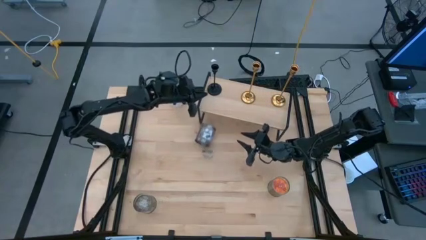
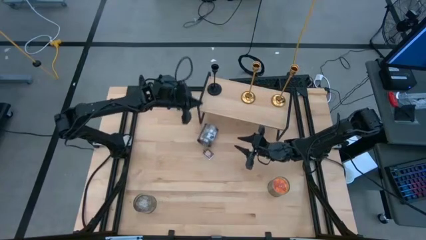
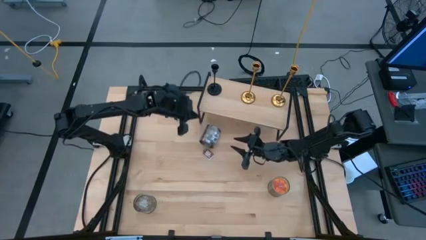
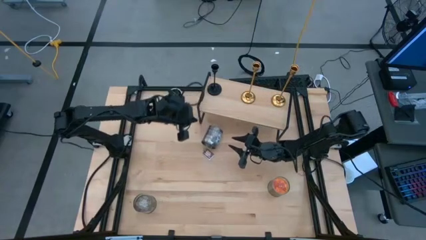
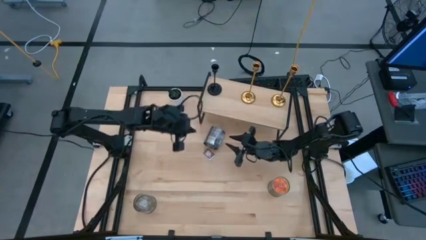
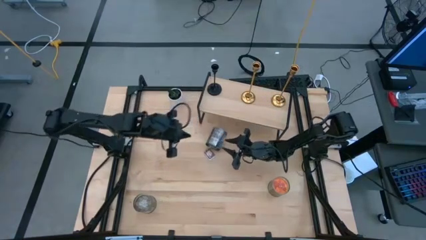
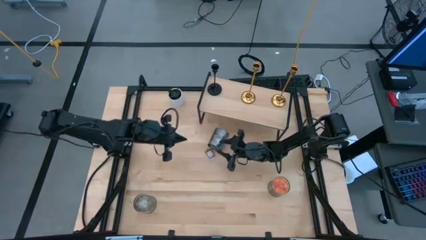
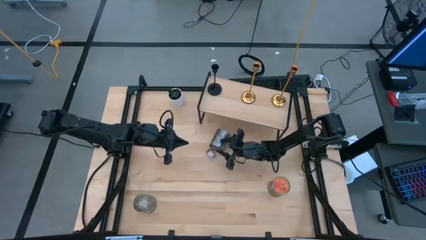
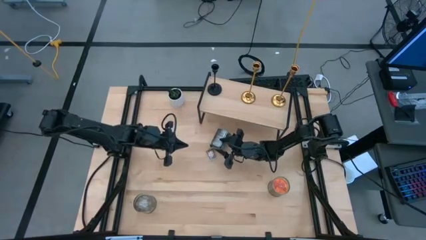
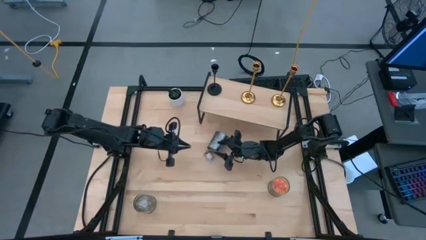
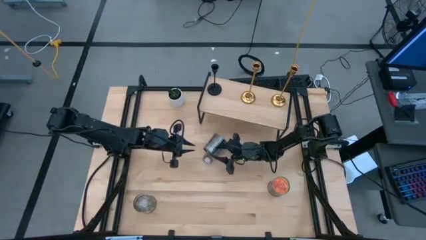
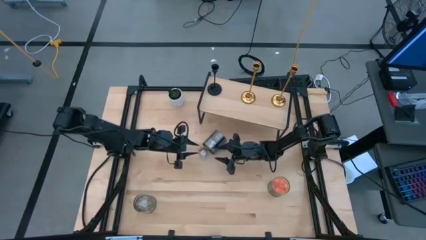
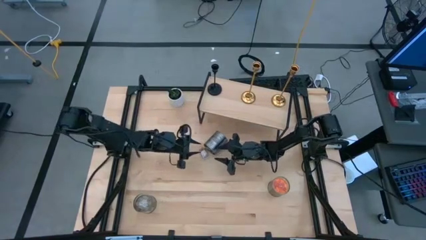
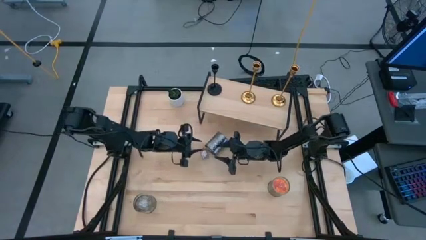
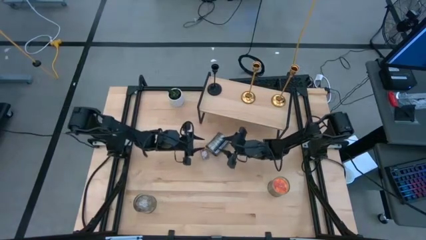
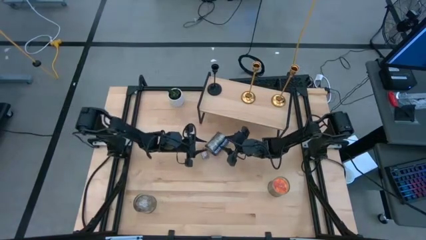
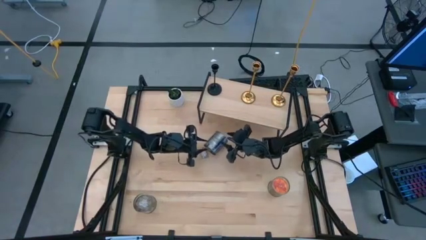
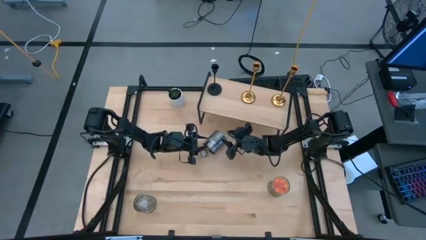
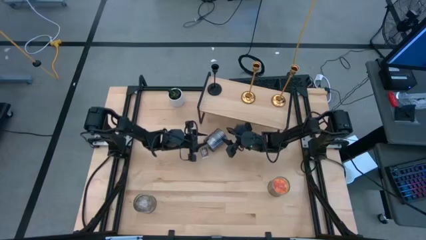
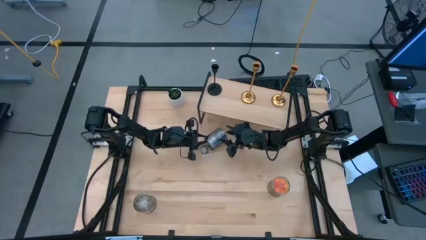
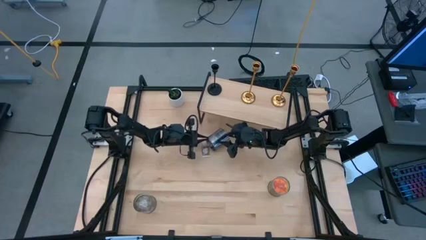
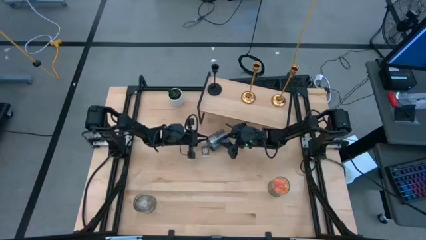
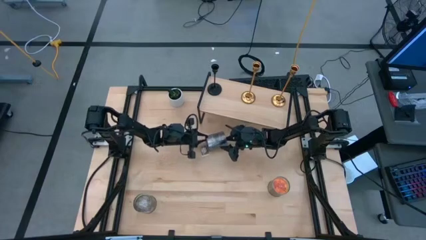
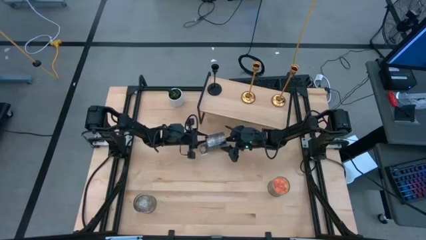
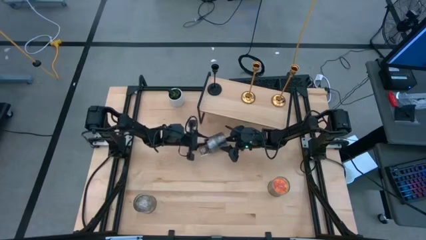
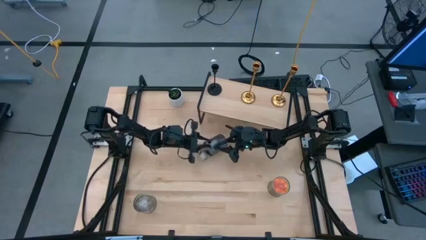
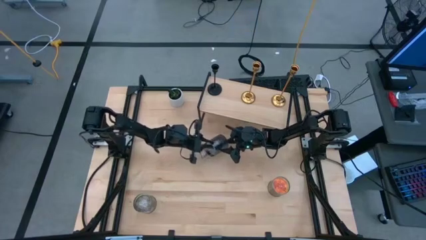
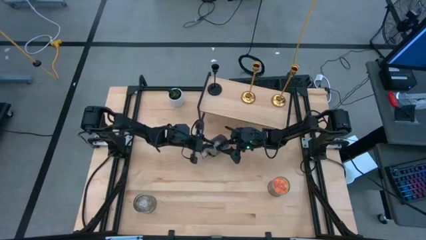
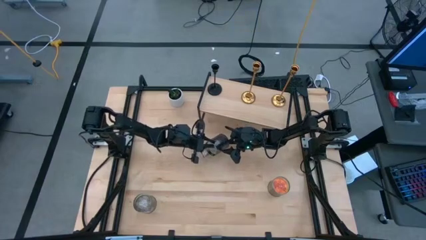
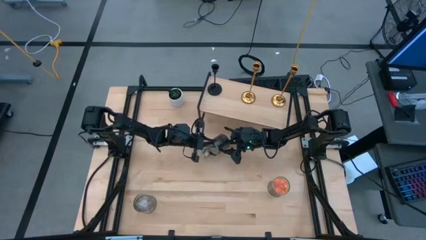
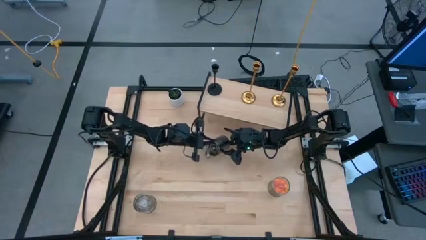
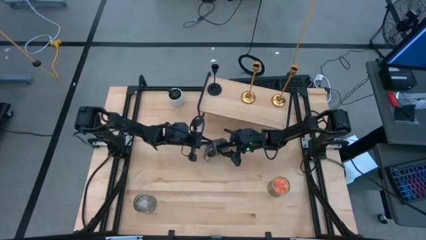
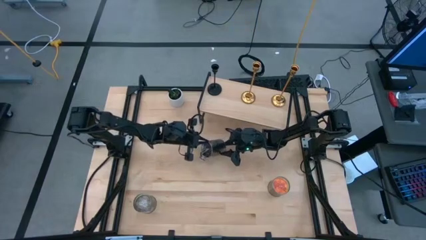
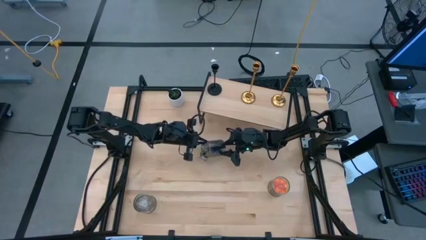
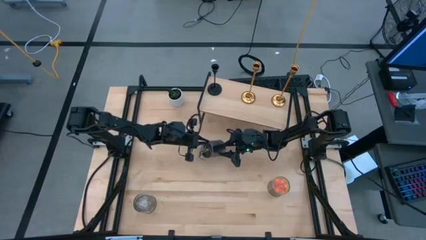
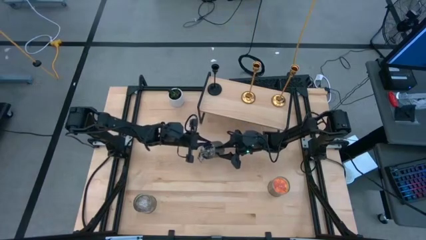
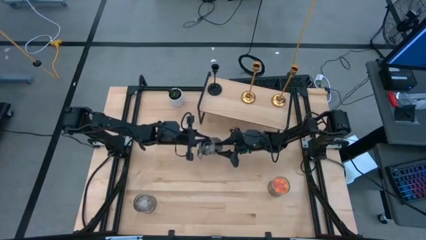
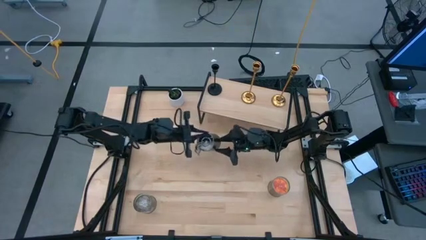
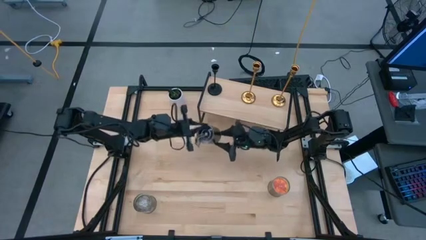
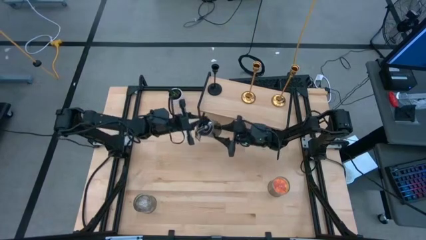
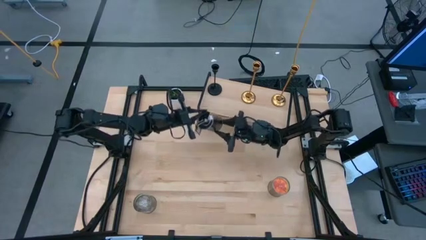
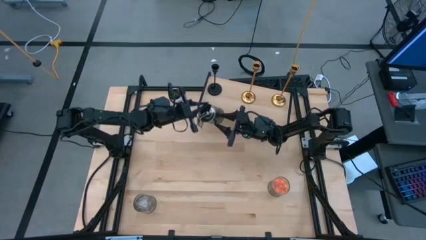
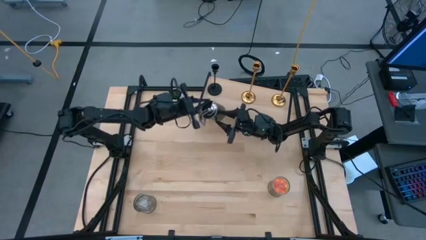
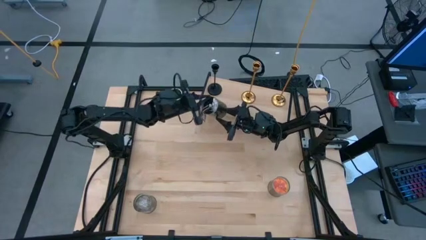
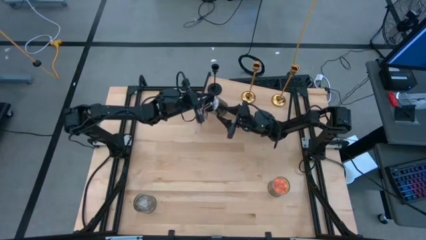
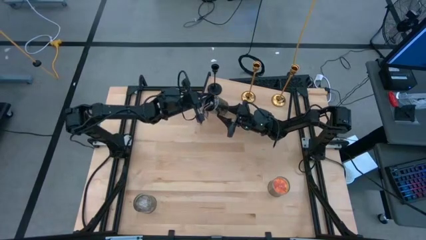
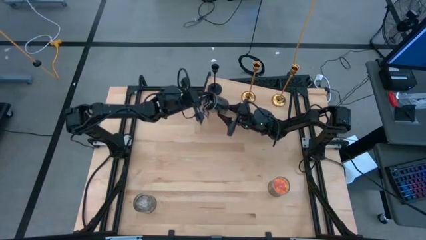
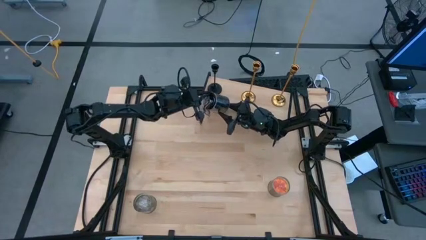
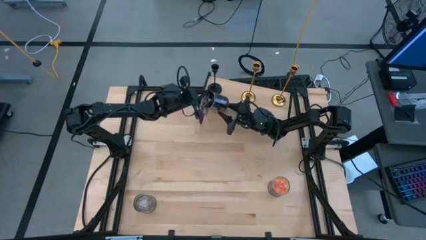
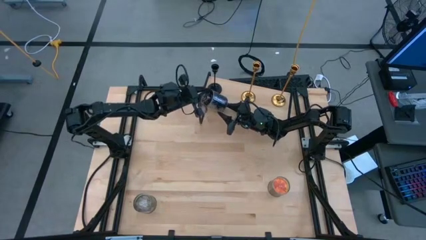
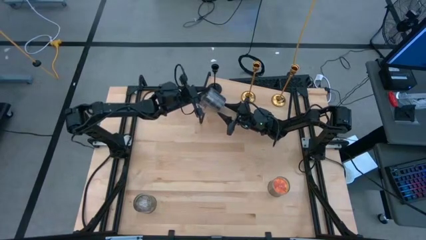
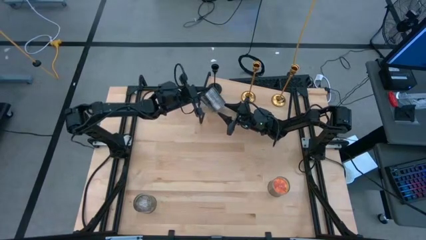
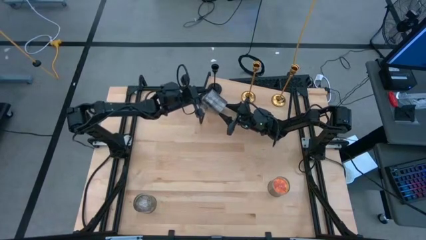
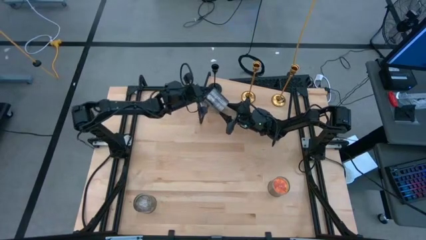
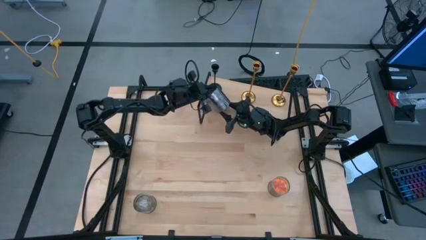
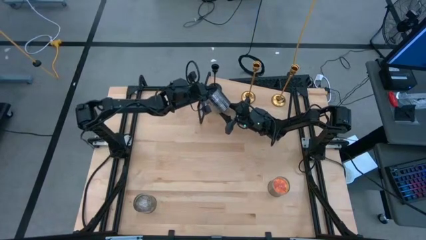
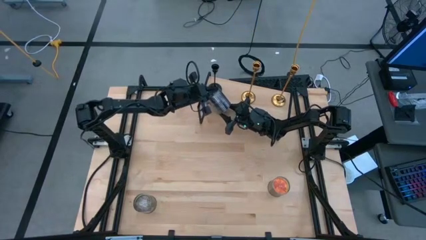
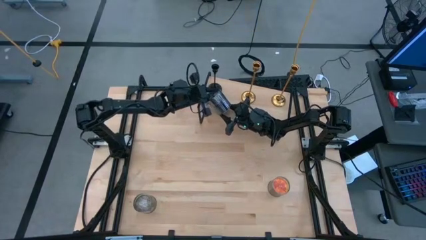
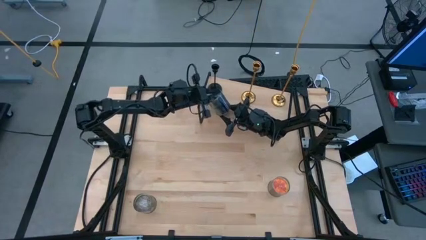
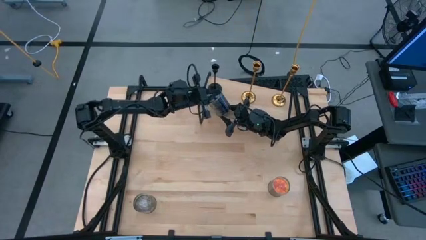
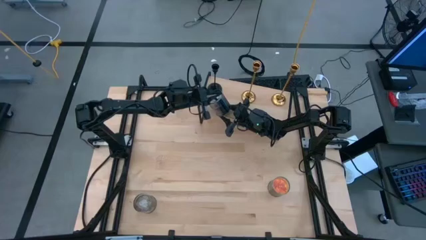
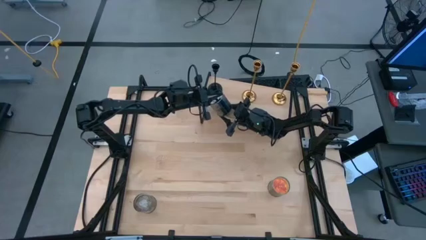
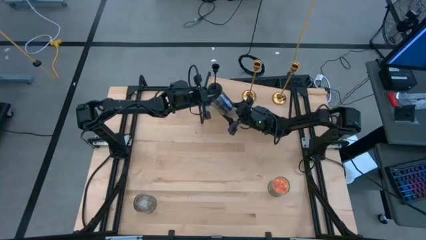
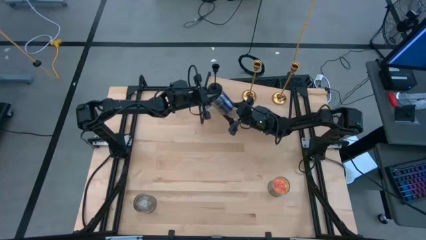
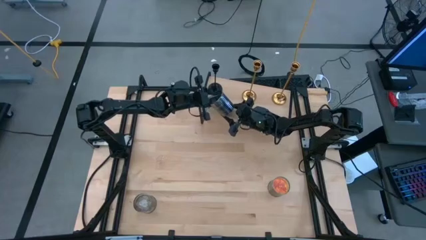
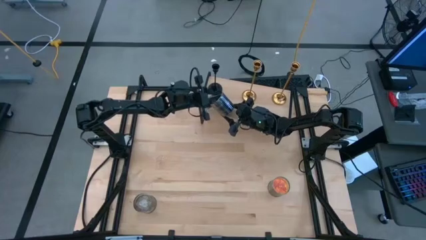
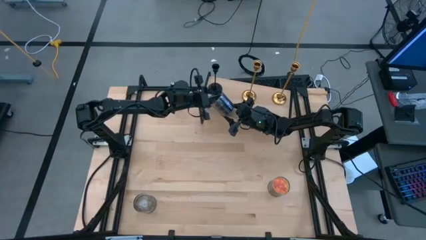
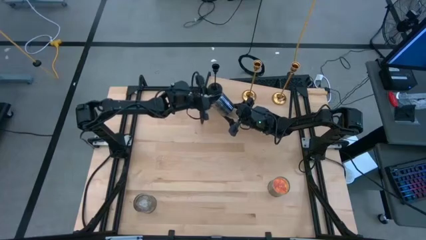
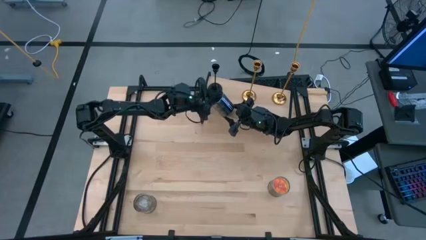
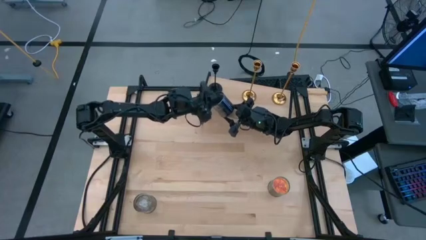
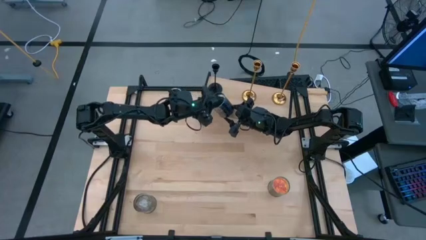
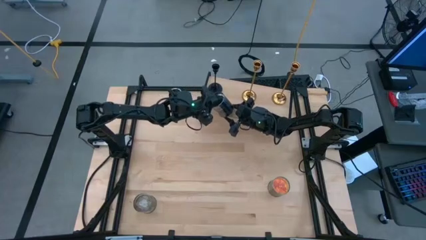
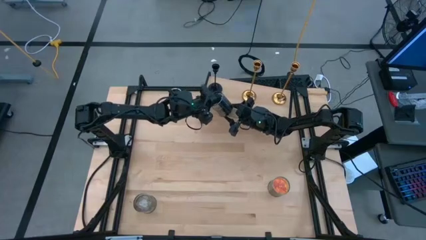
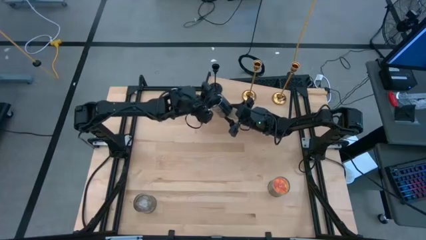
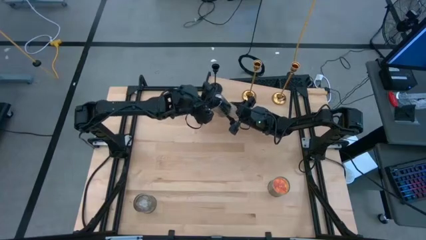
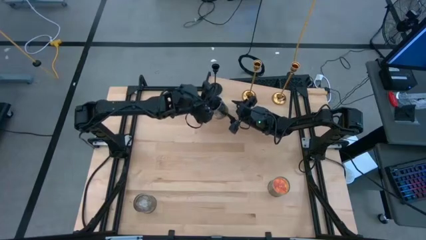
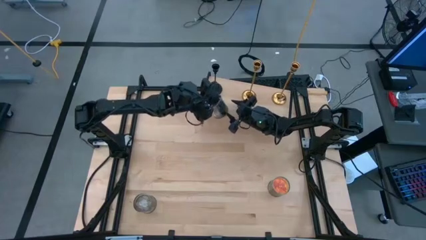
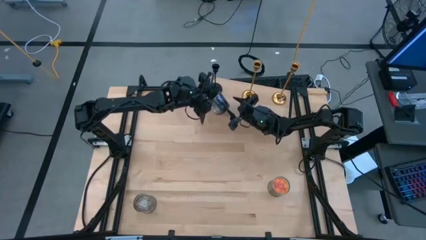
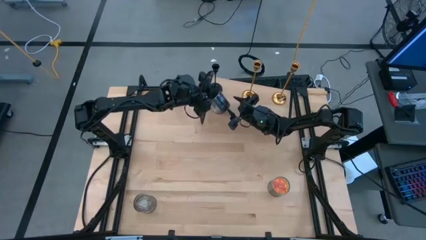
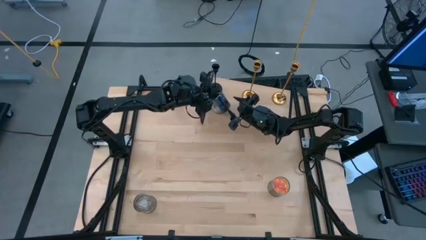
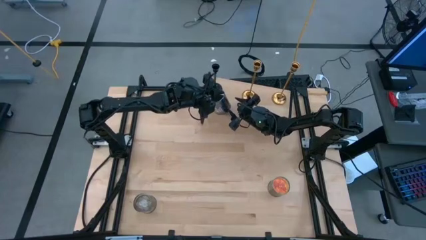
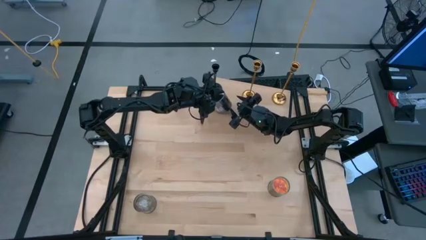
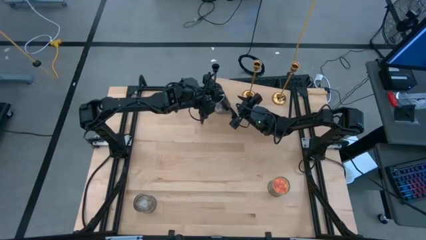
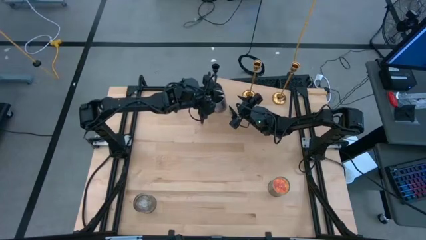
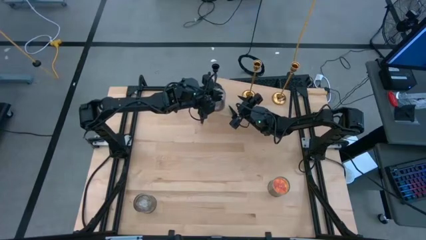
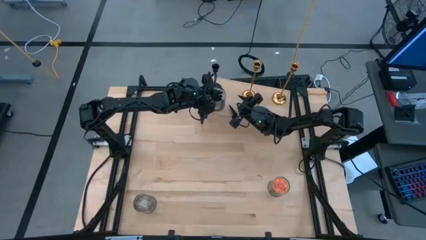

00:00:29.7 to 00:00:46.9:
Task: Pick & Place candle stick holders
Put the top brown scented candle on the shelf
